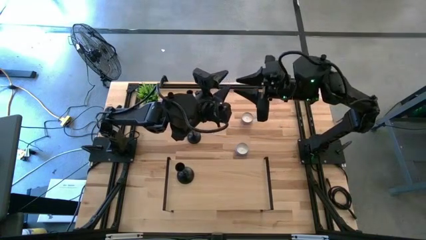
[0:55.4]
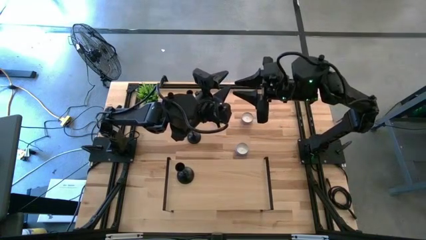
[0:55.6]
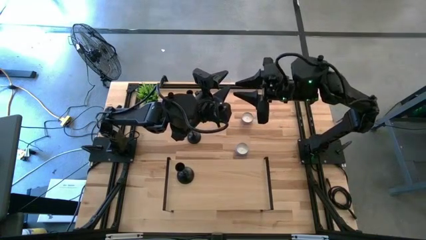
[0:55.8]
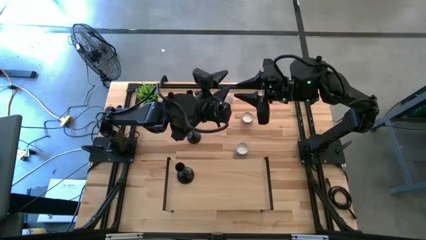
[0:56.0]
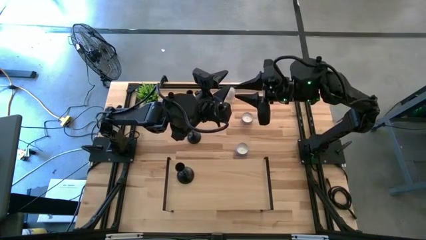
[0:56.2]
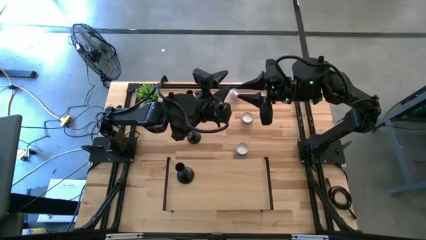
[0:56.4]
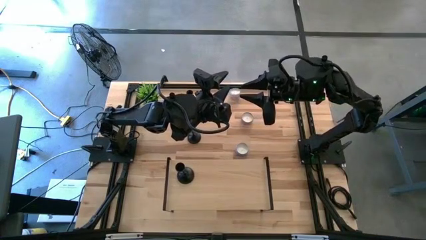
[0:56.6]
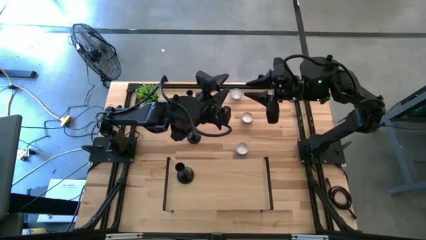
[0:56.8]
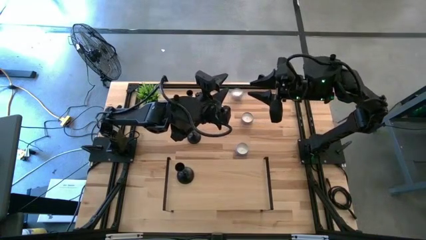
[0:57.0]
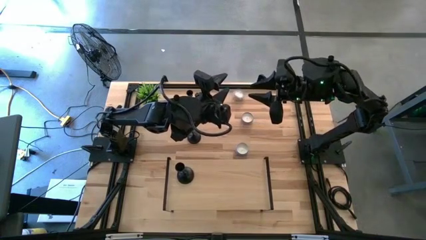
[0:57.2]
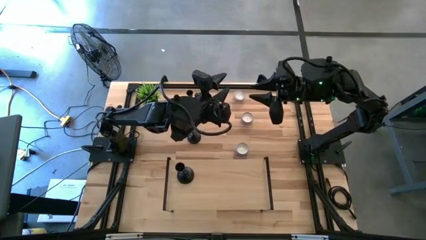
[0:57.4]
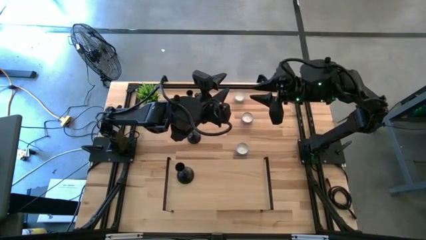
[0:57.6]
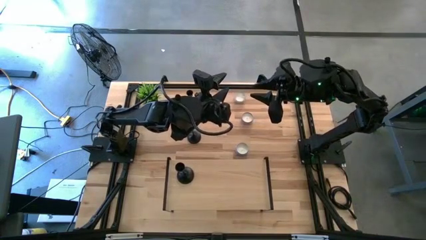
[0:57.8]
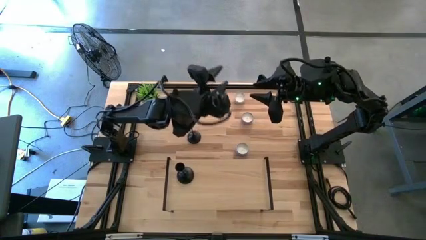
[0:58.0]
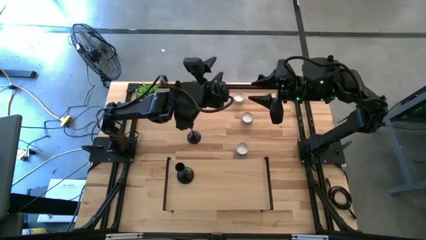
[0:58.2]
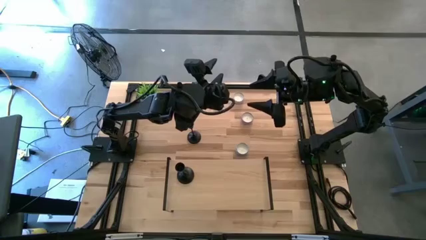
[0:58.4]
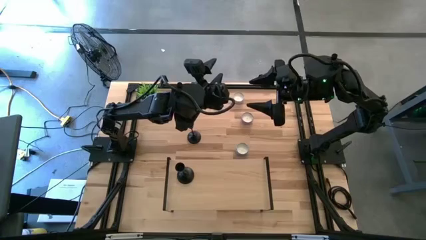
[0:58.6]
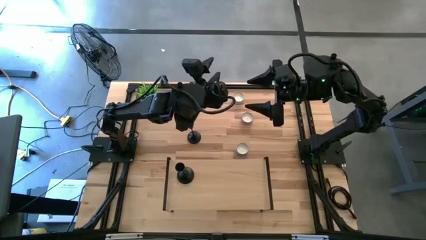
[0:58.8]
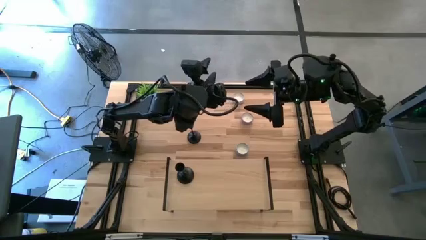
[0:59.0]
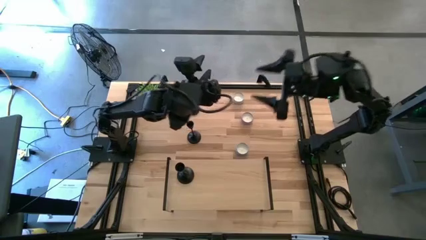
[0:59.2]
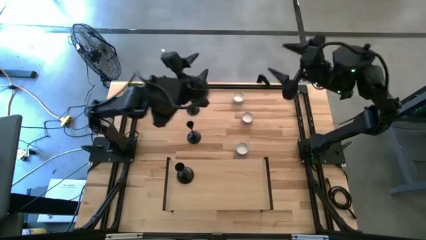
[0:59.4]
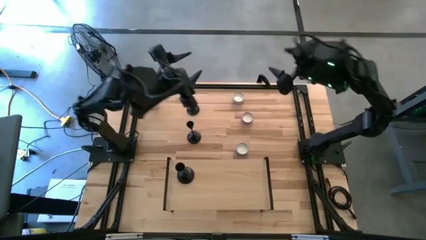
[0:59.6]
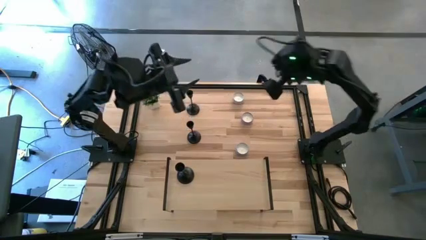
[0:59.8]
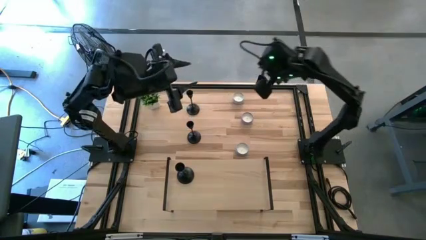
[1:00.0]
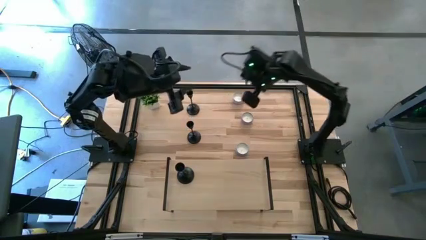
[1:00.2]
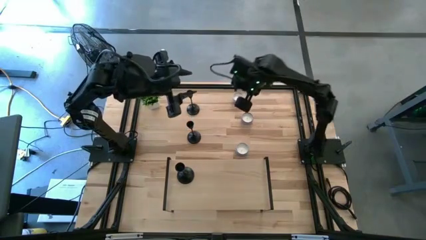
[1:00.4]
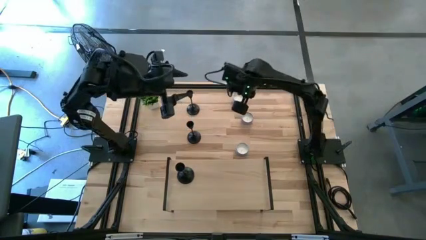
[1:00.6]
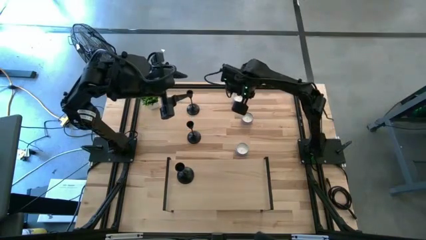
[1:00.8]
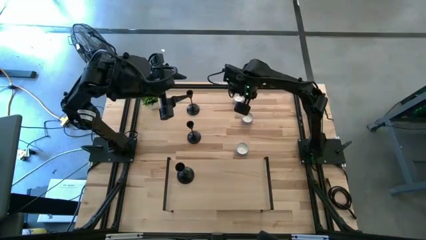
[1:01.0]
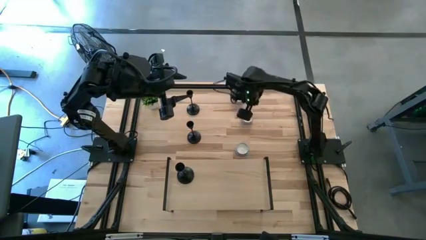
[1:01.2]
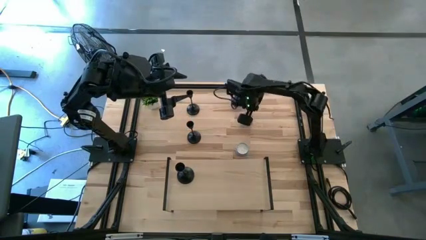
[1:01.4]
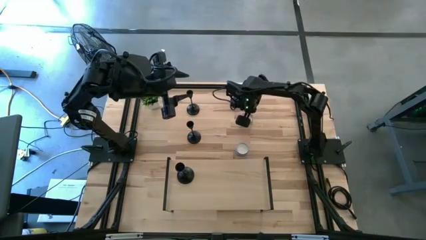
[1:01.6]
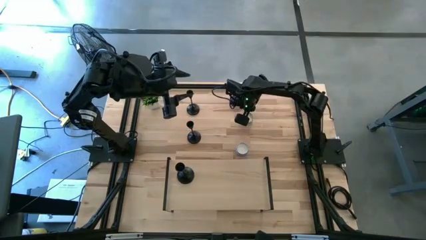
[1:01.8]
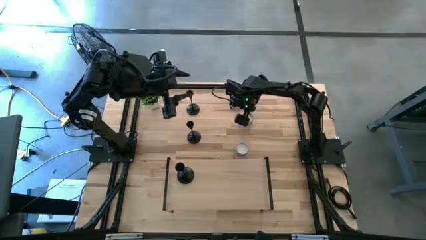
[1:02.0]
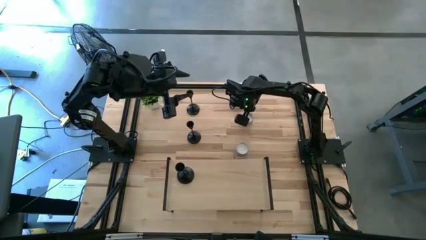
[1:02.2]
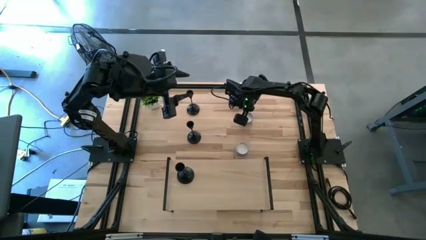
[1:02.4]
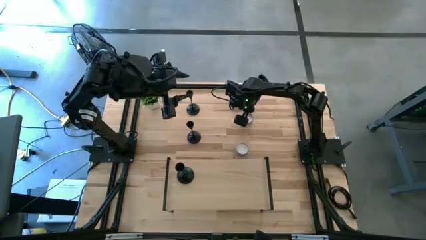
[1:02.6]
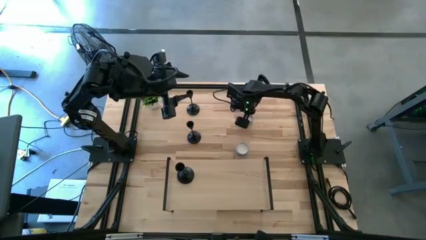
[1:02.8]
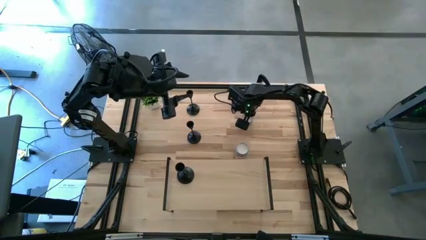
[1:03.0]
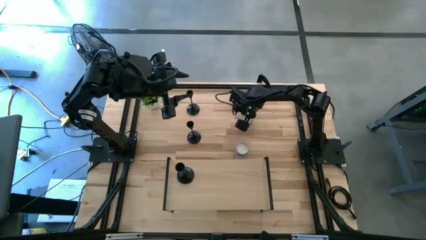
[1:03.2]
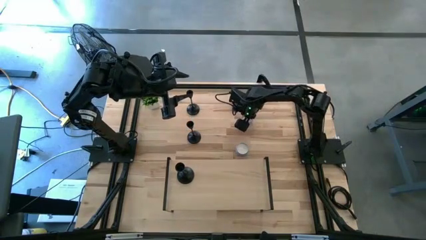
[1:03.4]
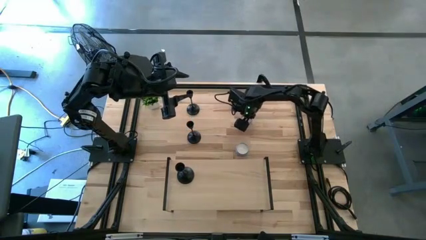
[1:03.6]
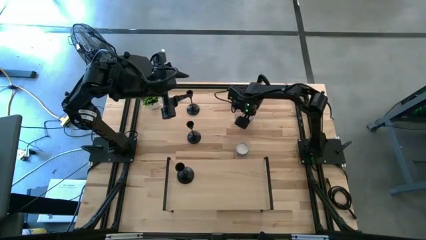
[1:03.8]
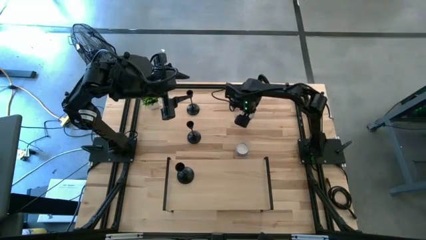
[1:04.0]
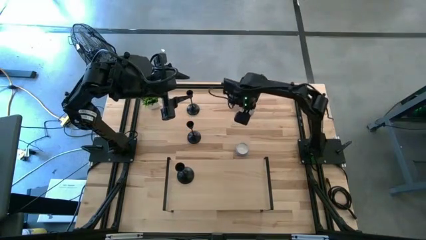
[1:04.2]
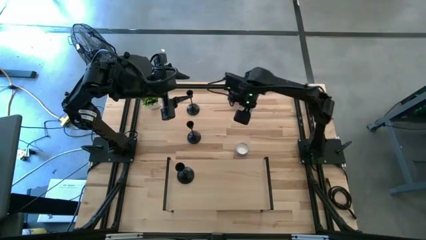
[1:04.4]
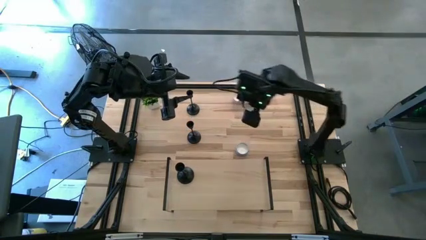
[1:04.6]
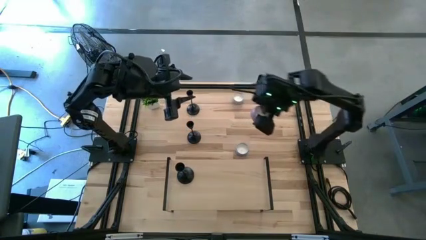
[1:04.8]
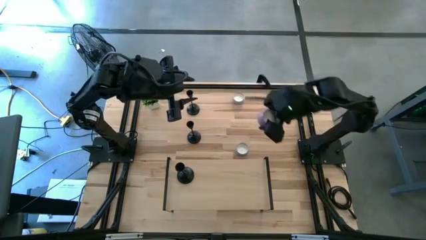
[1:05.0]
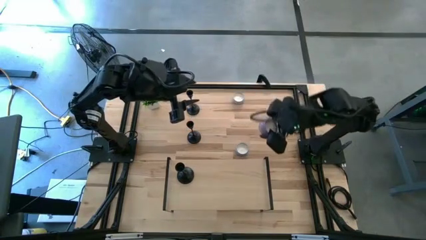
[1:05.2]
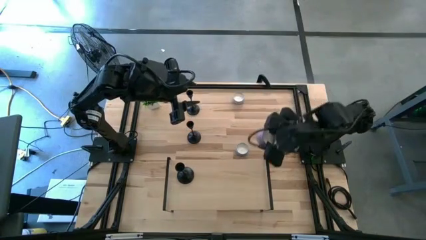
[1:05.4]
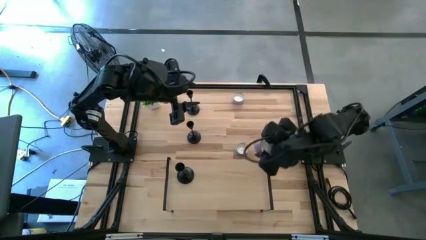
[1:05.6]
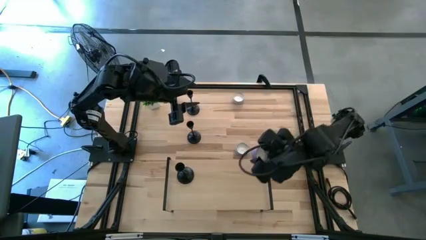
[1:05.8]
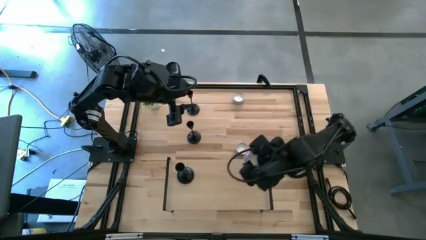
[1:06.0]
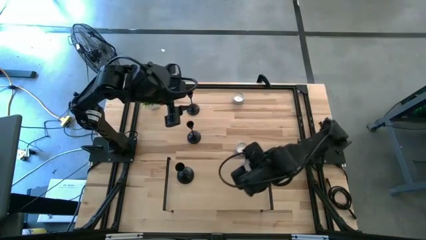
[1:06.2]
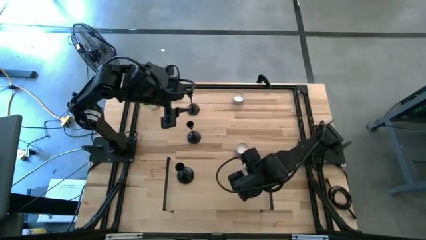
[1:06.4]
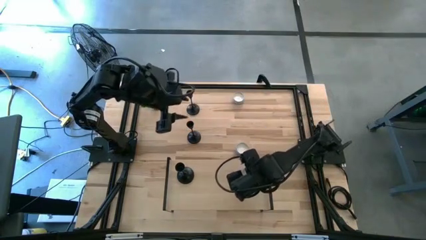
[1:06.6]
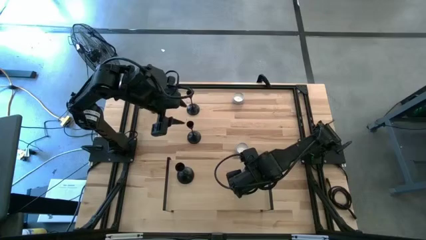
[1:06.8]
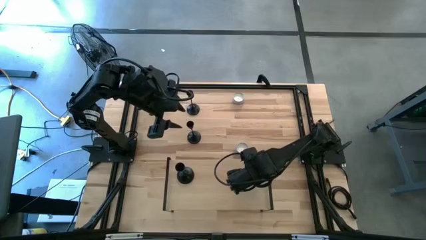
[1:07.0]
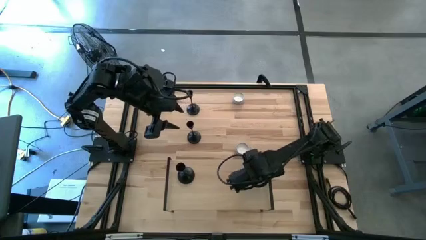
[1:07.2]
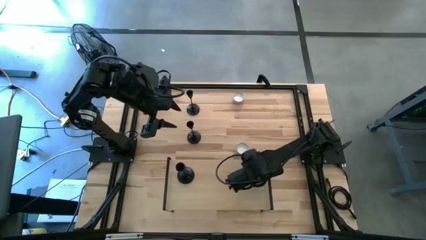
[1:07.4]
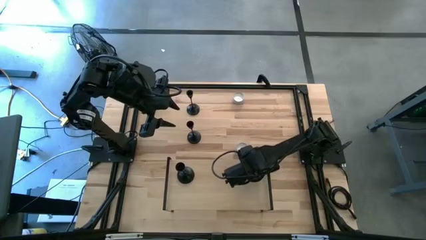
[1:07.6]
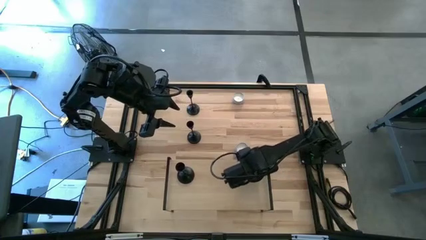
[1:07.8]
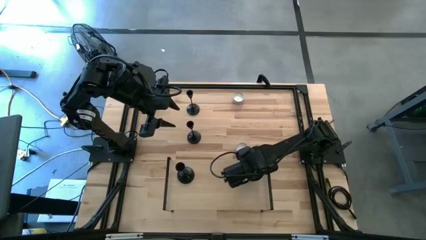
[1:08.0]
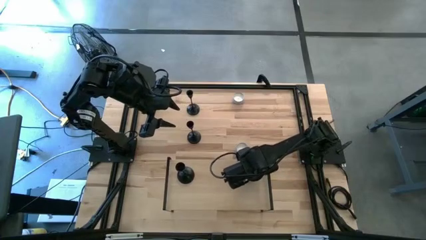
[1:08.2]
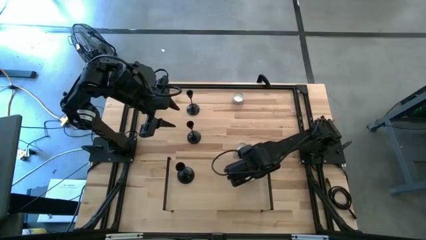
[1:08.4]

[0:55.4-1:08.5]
Task: Pick & Place candle stick holders
Put the pink scented candle on the shelf
